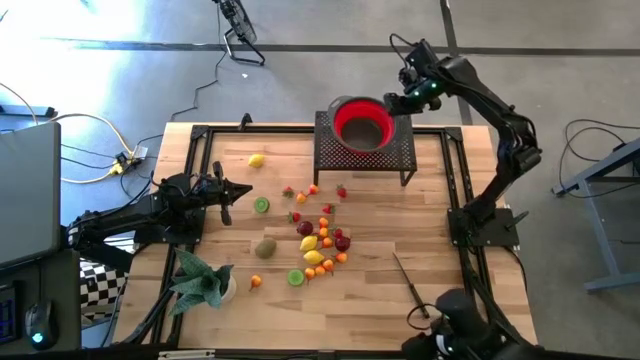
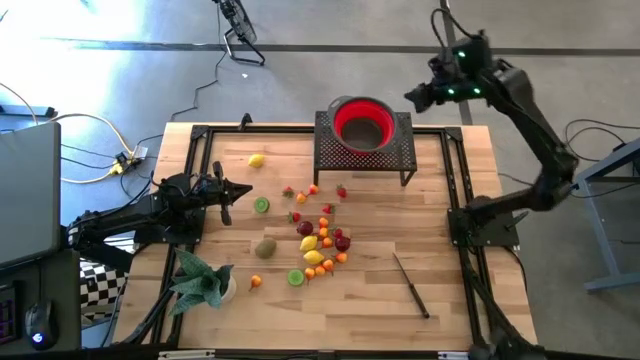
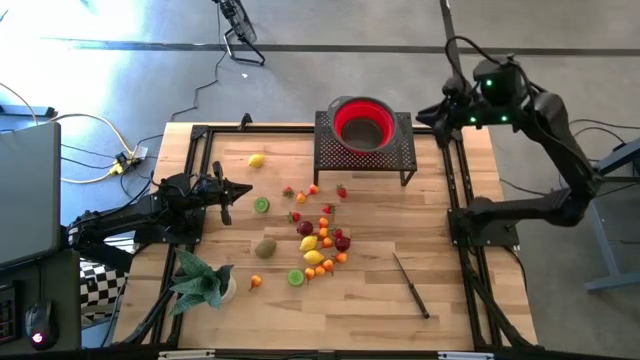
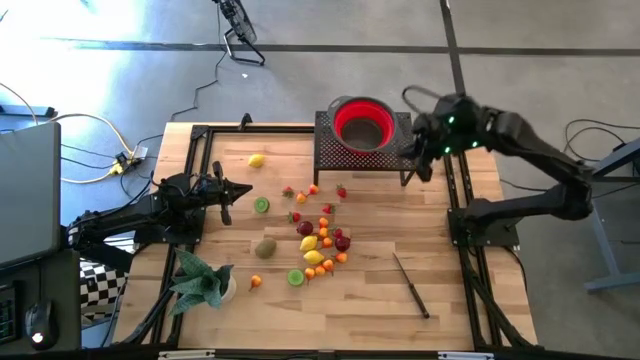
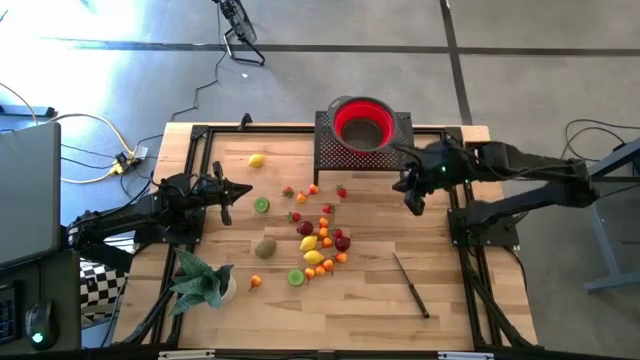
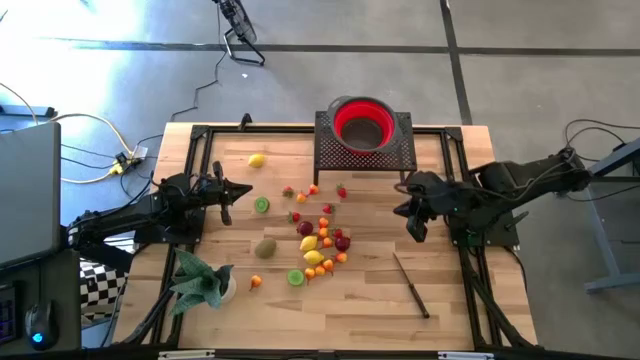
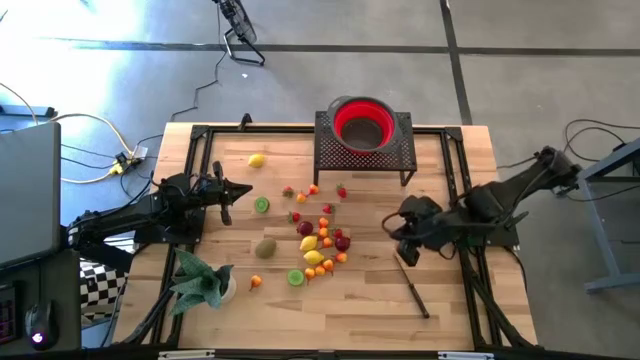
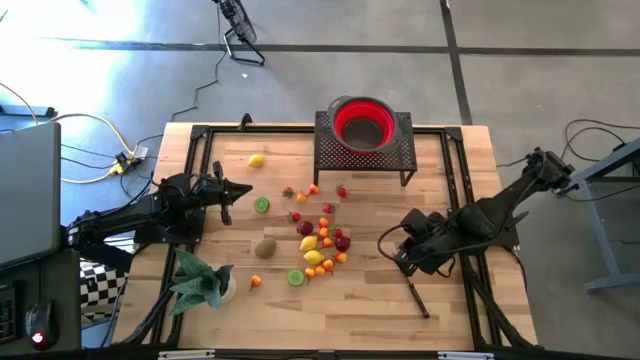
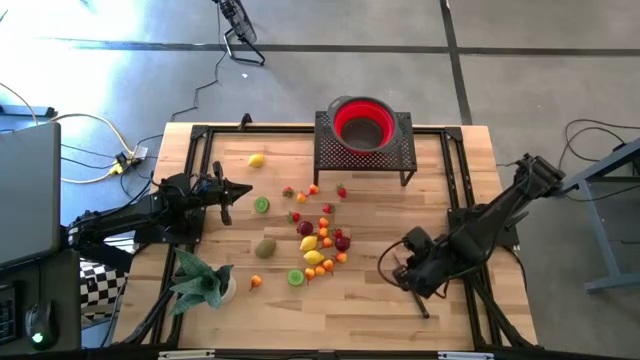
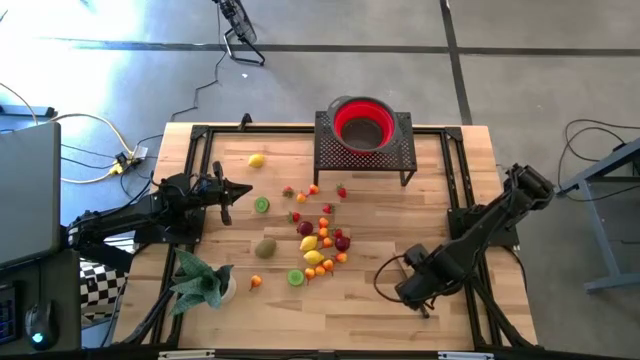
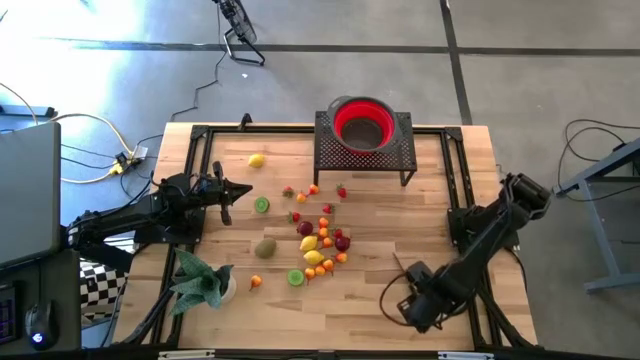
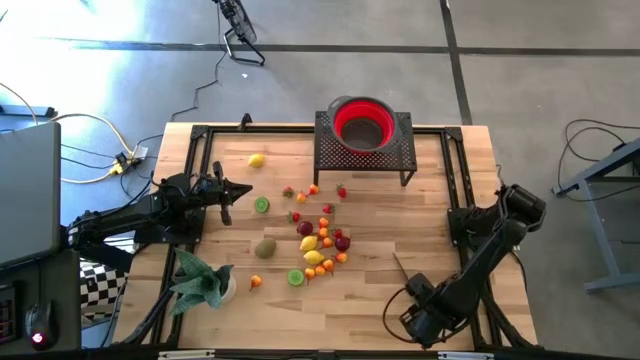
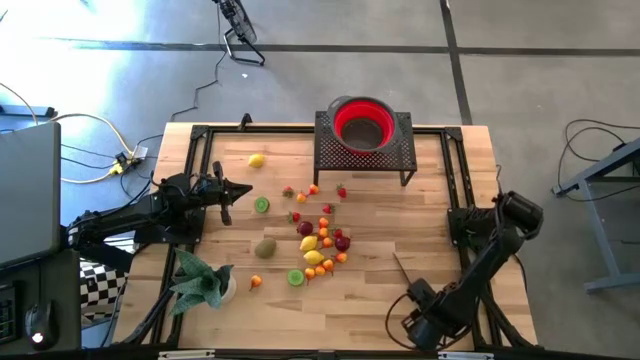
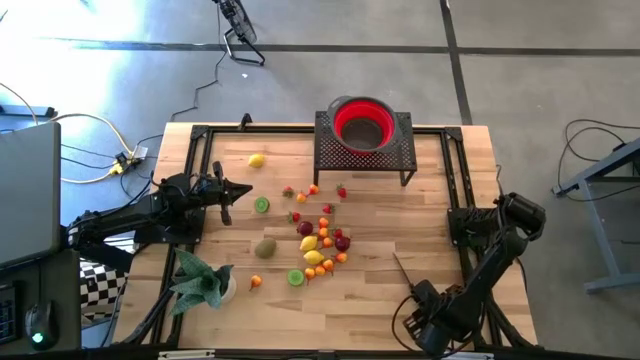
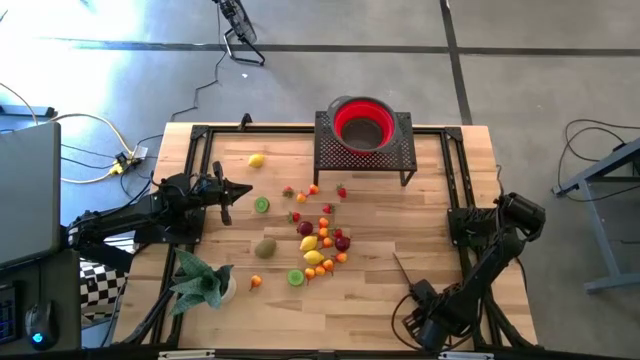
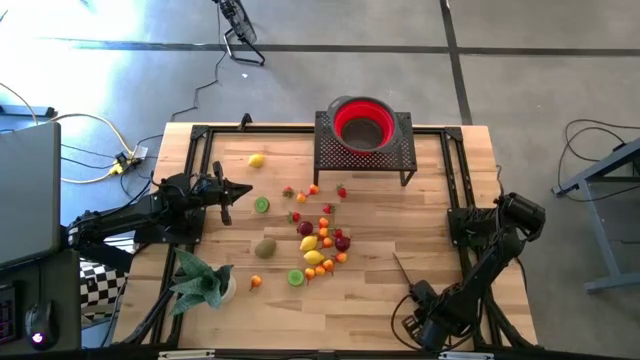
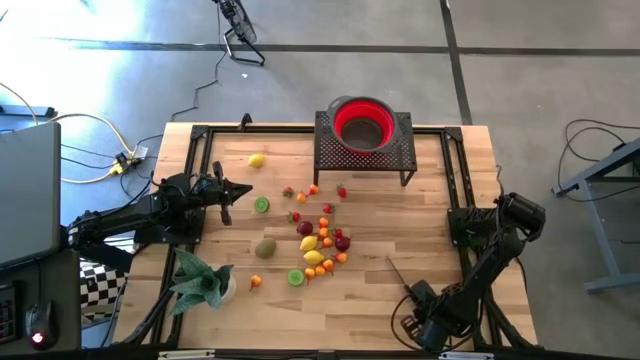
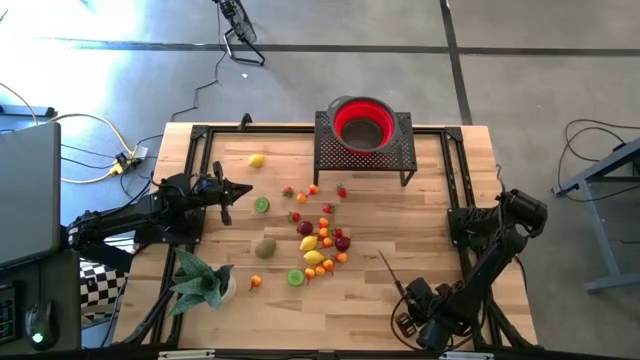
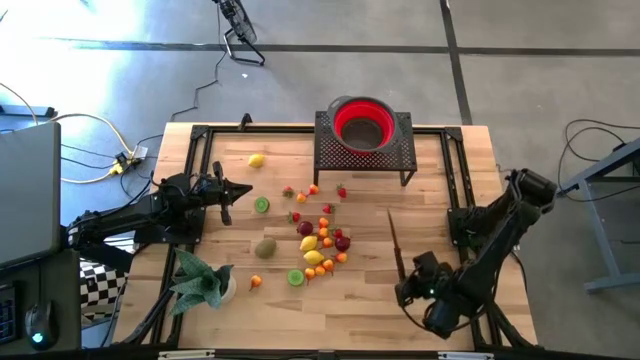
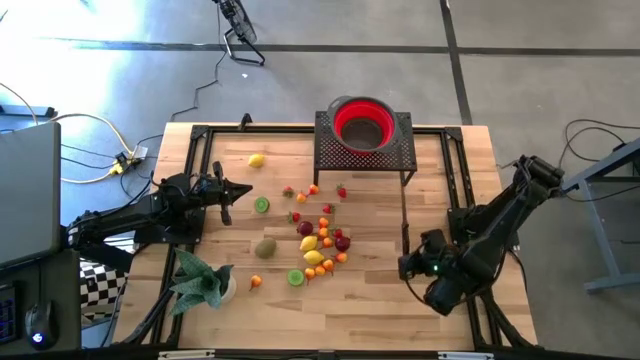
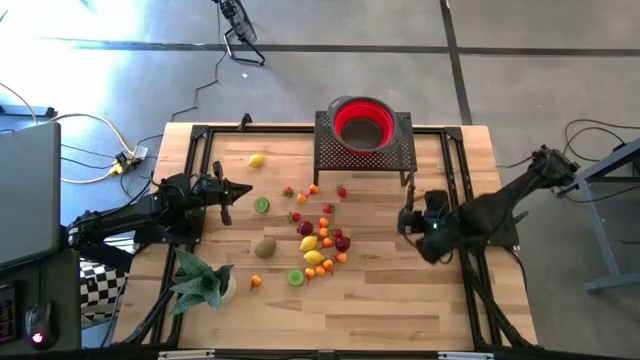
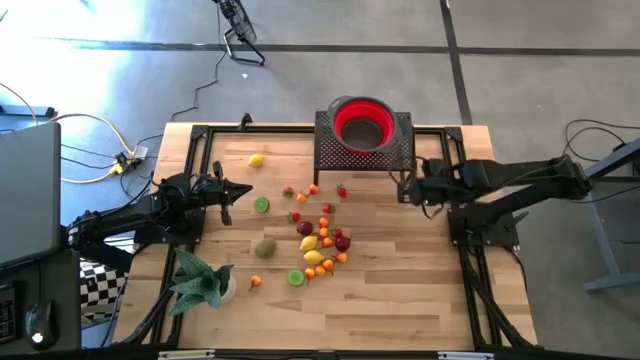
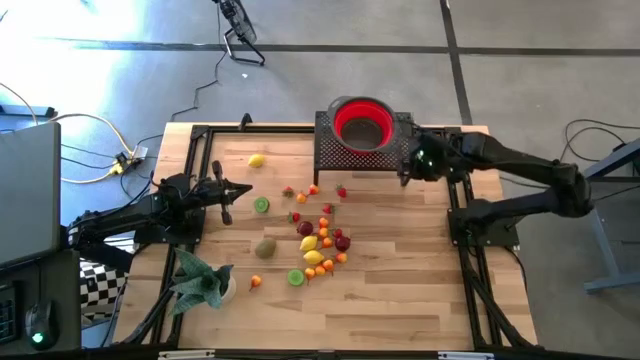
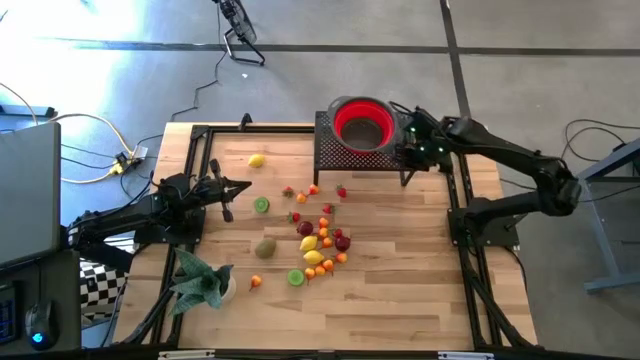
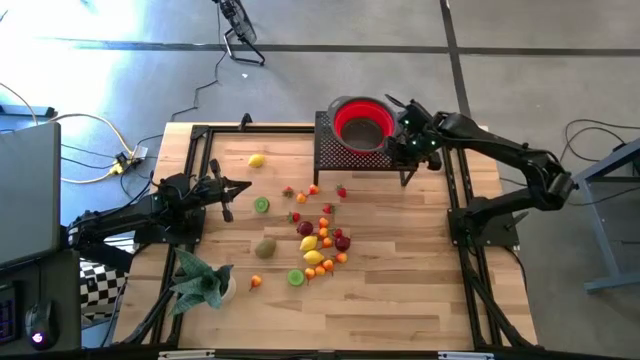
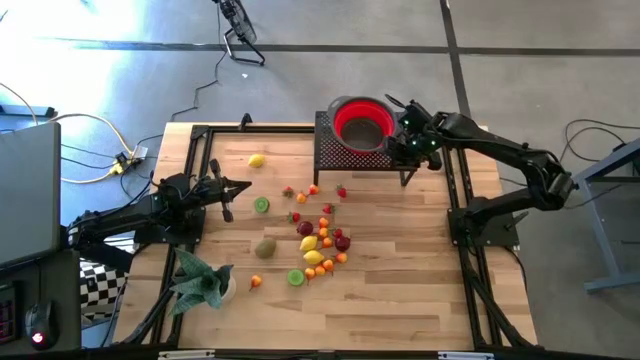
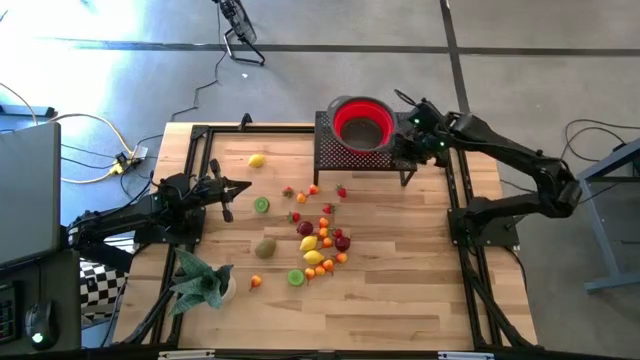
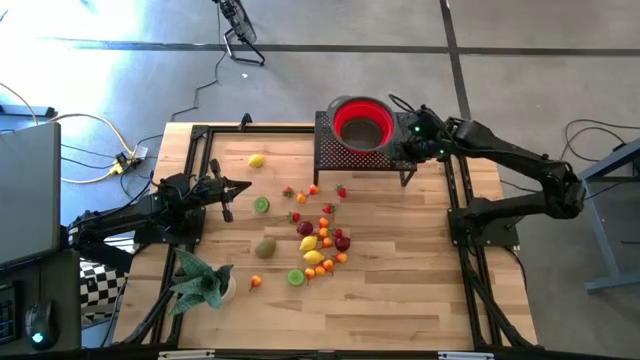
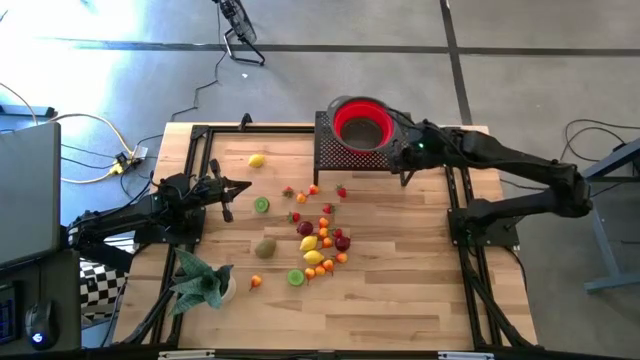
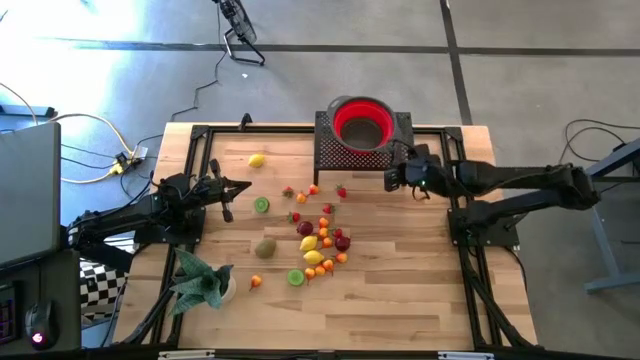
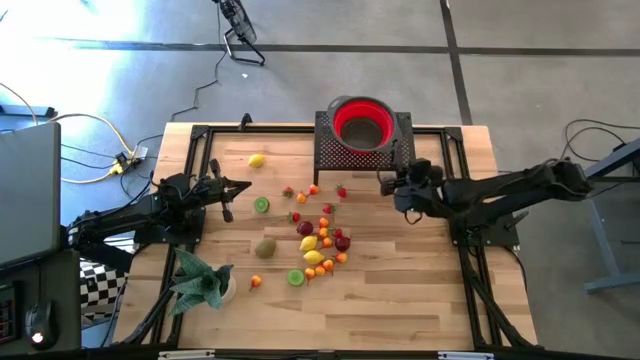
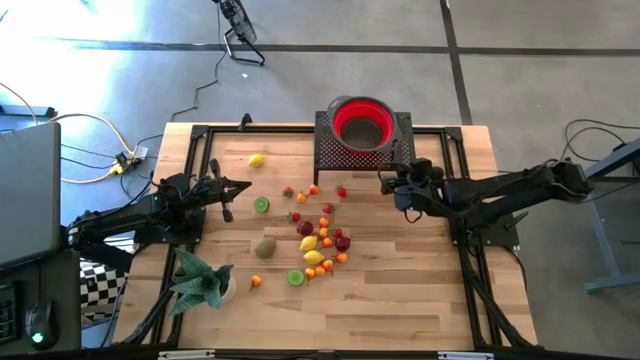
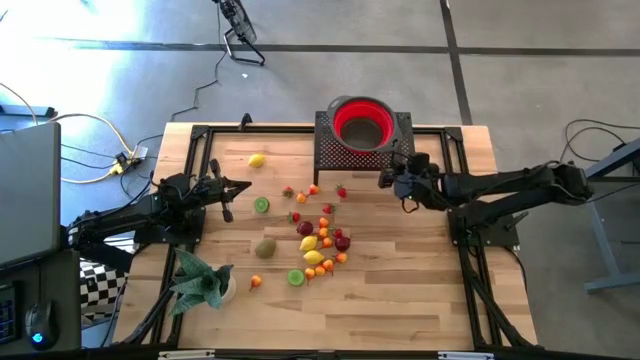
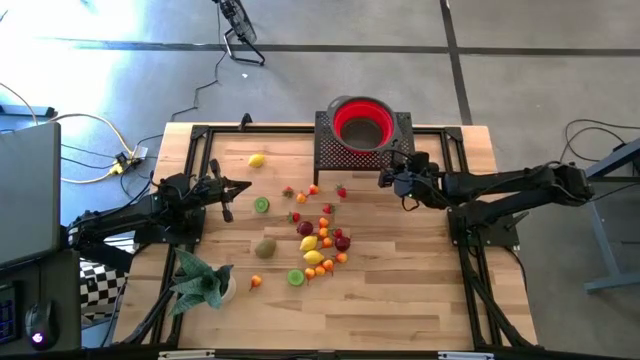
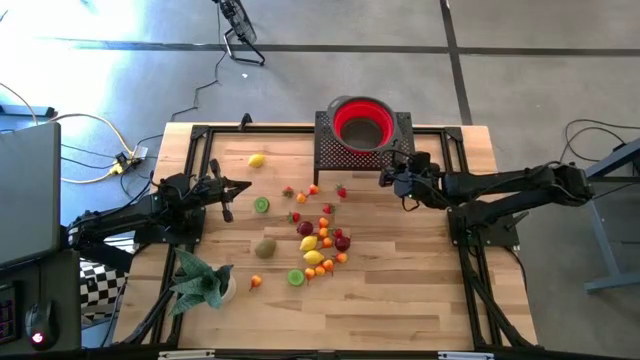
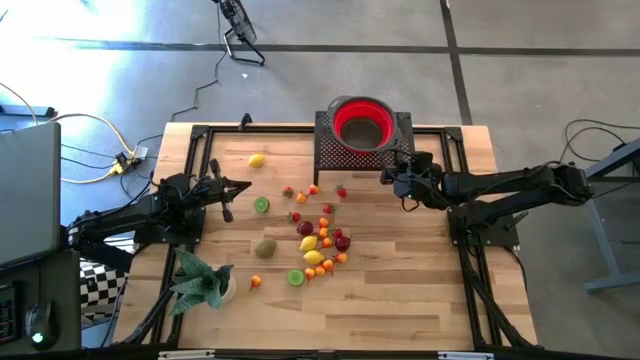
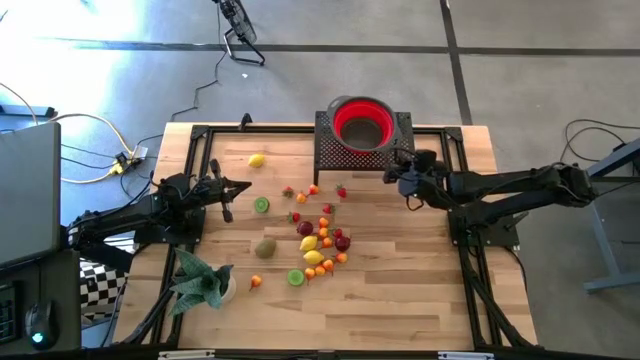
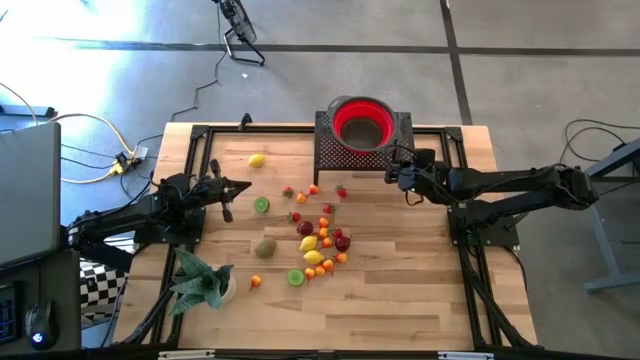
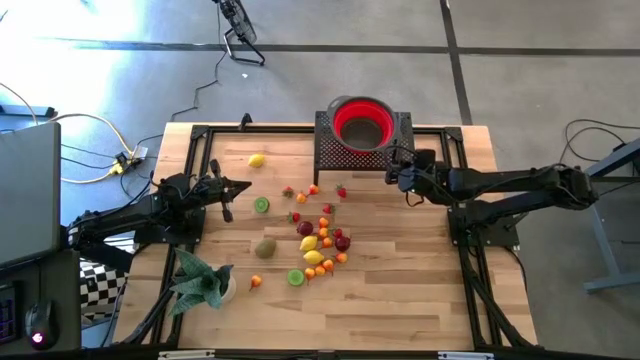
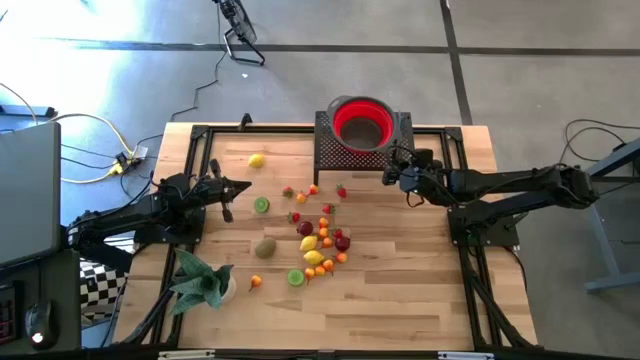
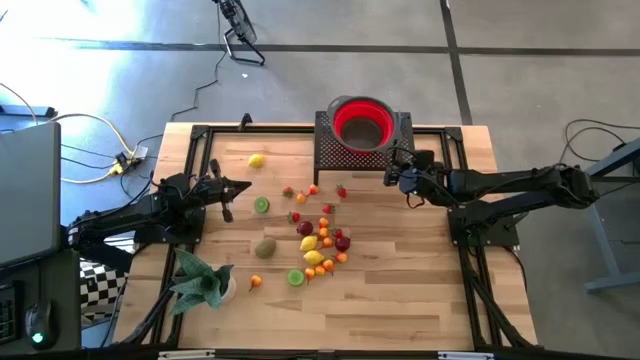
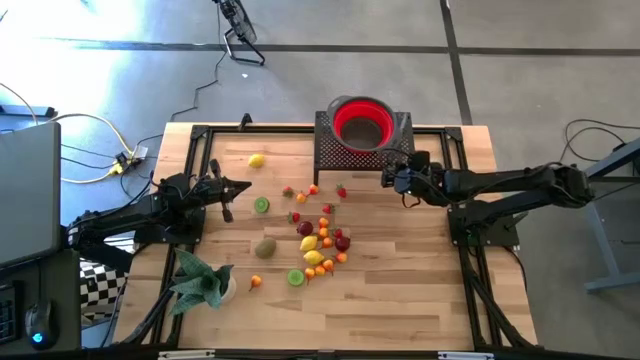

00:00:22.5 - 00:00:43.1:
Task: Pick & Place Fruit
Put the knife on the shelf
